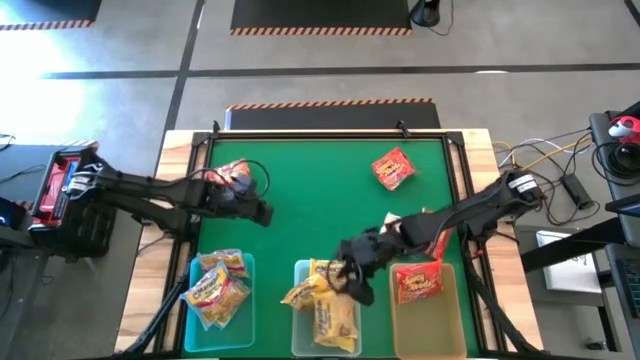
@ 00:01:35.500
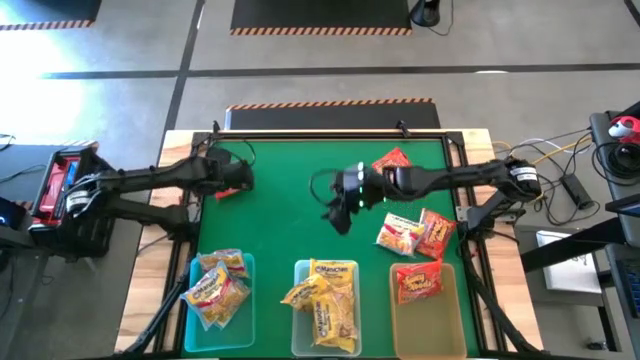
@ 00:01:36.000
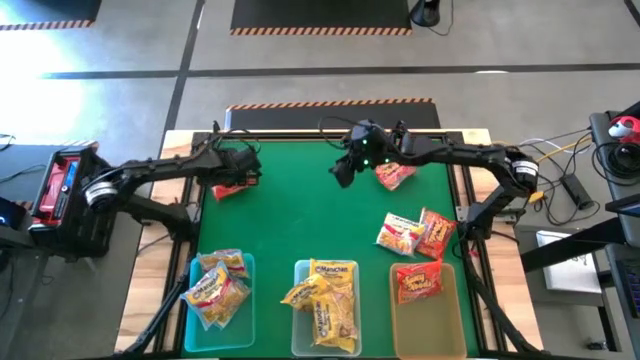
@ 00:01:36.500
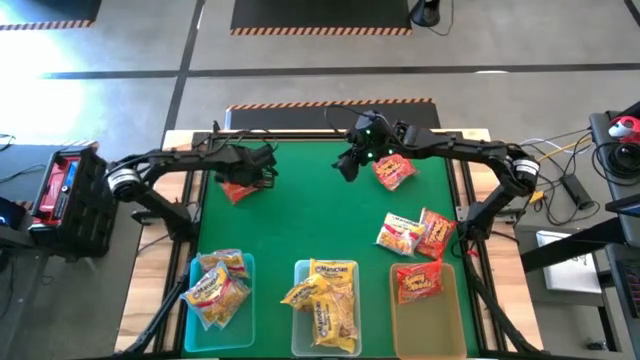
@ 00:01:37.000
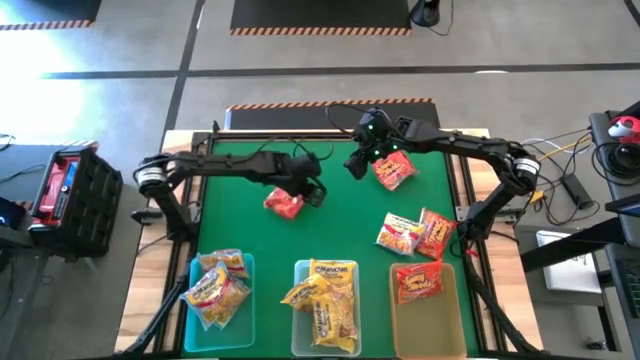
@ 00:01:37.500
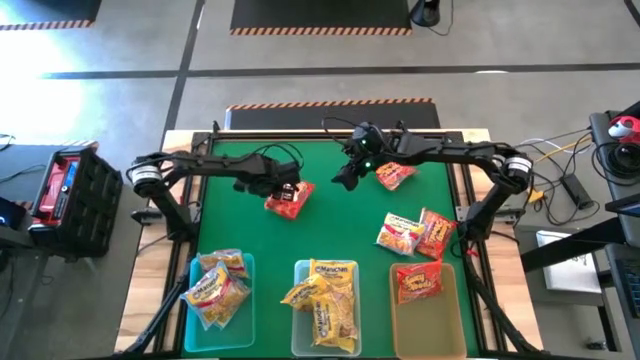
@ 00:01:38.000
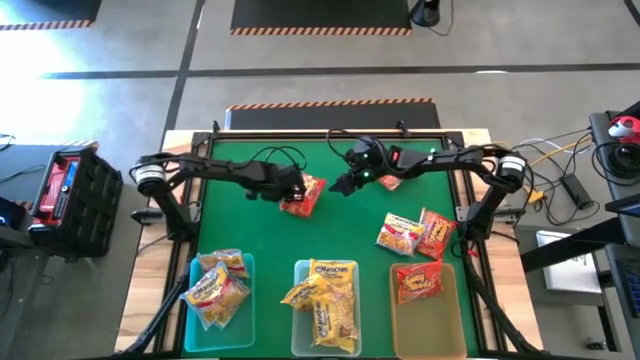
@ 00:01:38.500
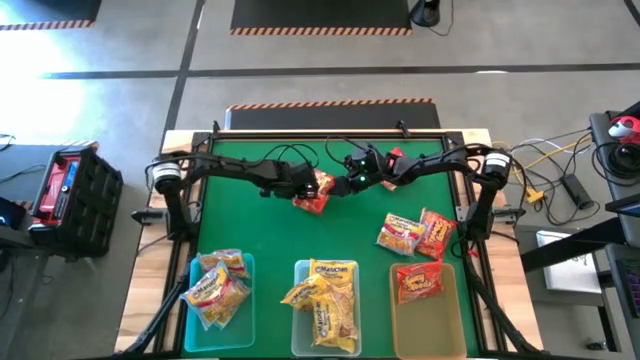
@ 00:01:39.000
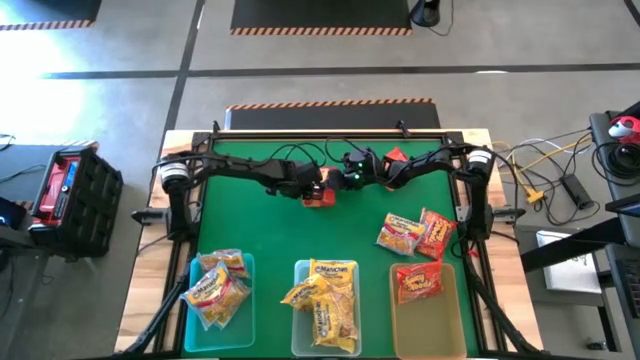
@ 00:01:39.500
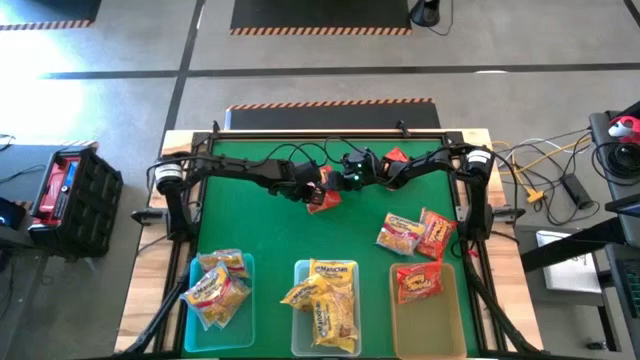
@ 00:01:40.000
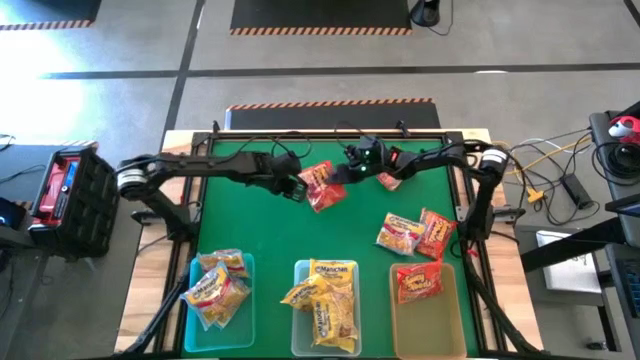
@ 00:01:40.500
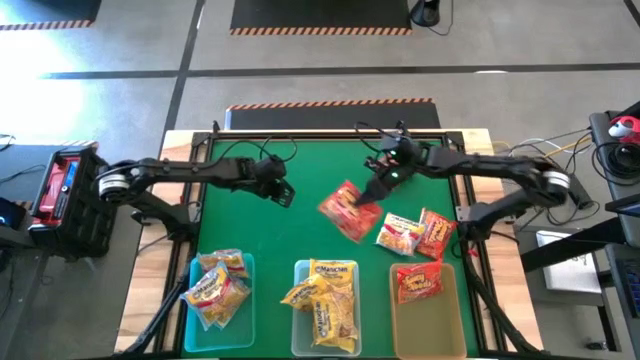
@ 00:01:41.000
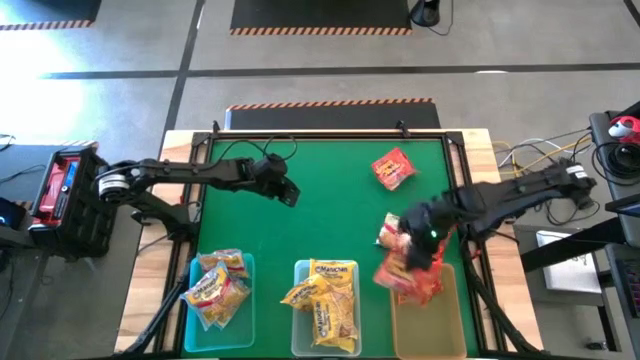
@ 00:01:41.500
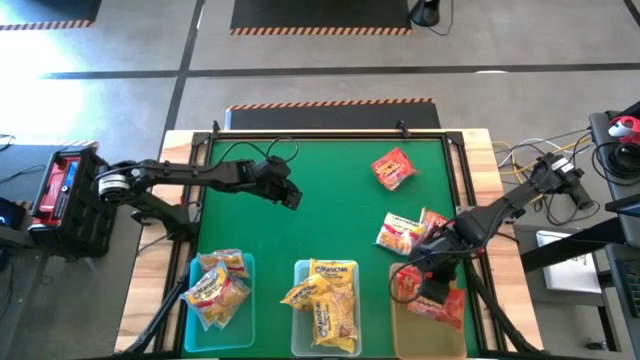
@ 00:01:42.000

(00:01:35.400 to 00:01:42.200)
Task: Sort Maruchan noodles
Put the orange noodle pack into the orange bin

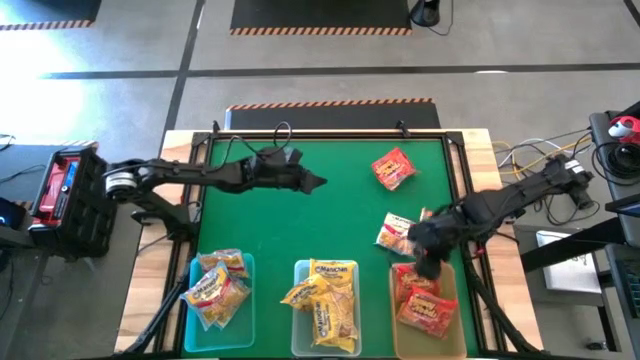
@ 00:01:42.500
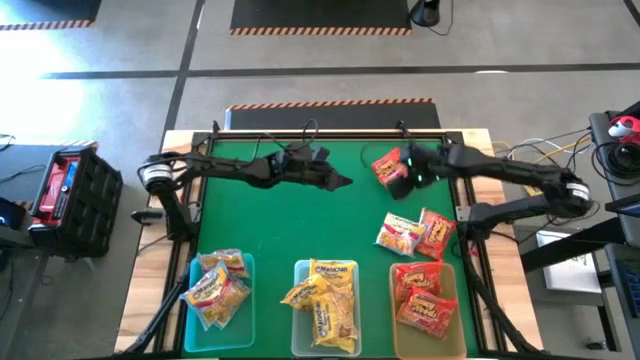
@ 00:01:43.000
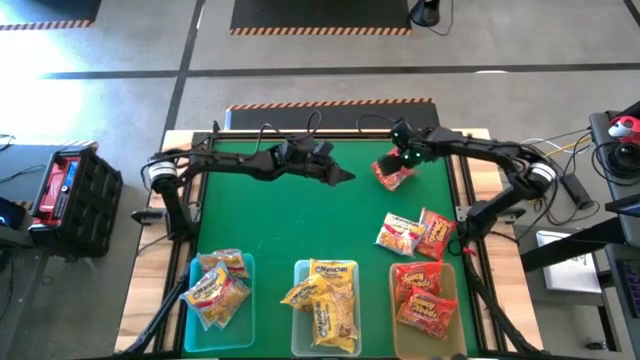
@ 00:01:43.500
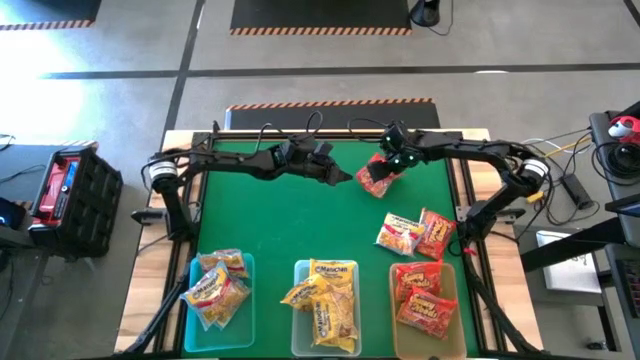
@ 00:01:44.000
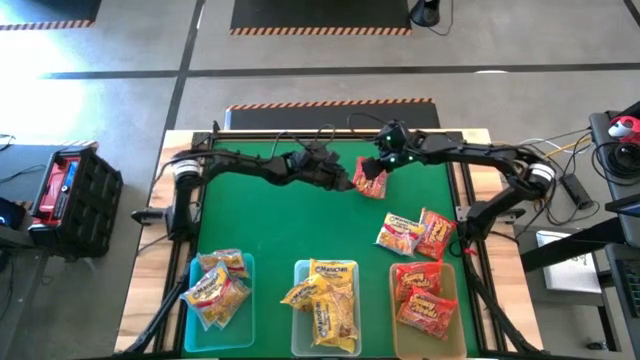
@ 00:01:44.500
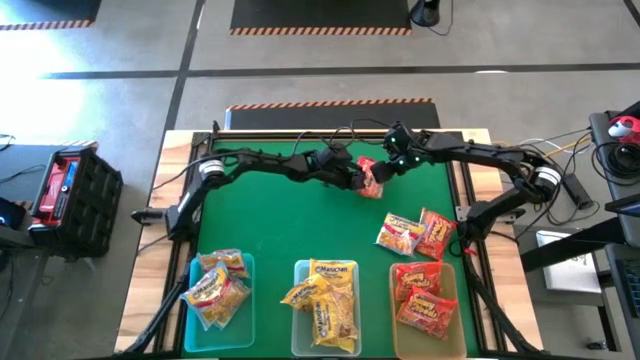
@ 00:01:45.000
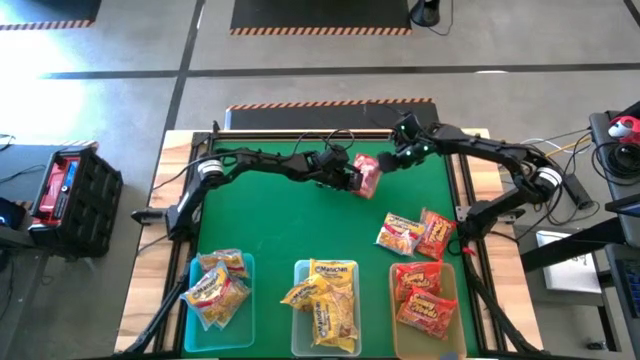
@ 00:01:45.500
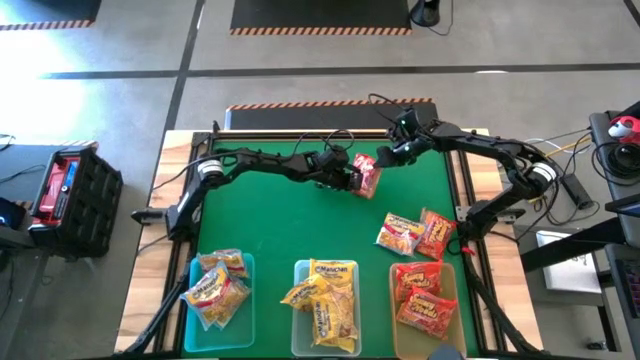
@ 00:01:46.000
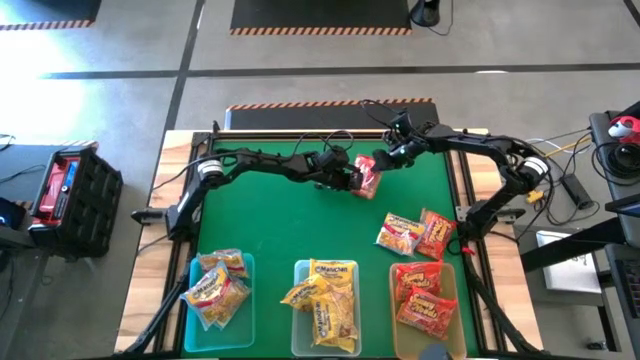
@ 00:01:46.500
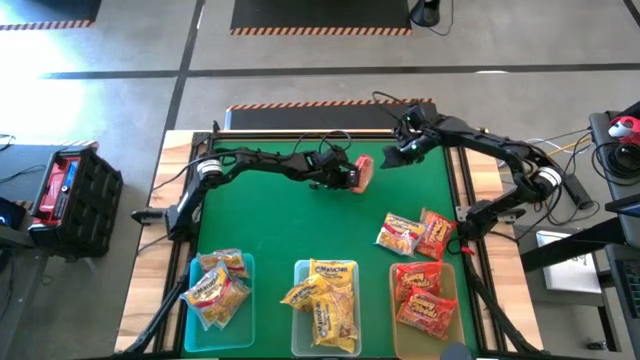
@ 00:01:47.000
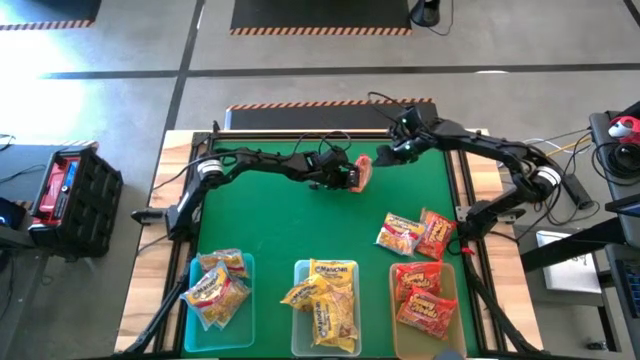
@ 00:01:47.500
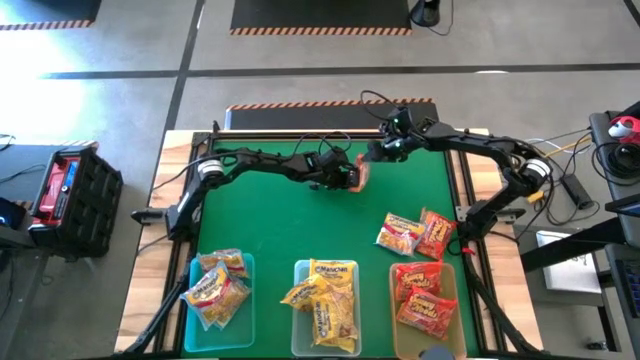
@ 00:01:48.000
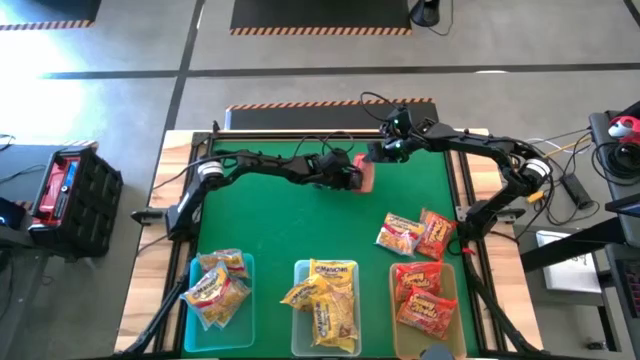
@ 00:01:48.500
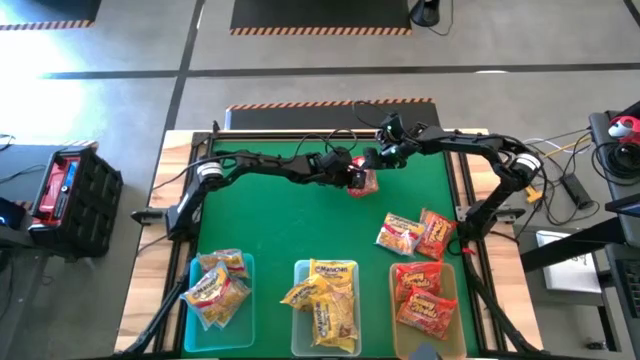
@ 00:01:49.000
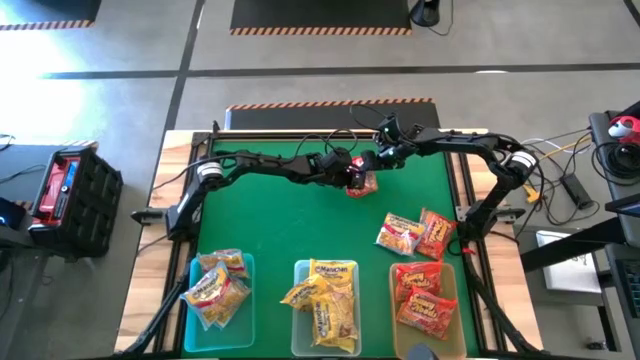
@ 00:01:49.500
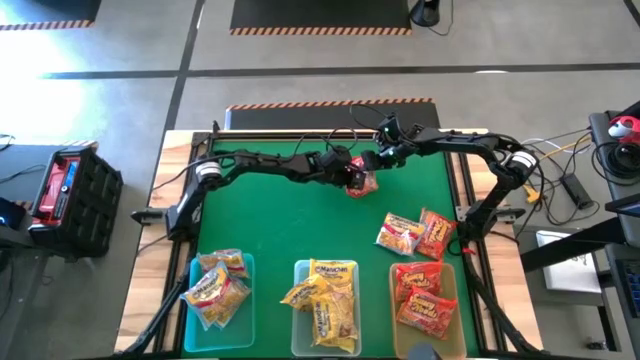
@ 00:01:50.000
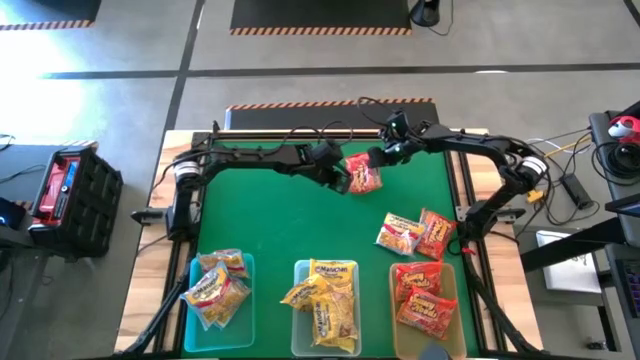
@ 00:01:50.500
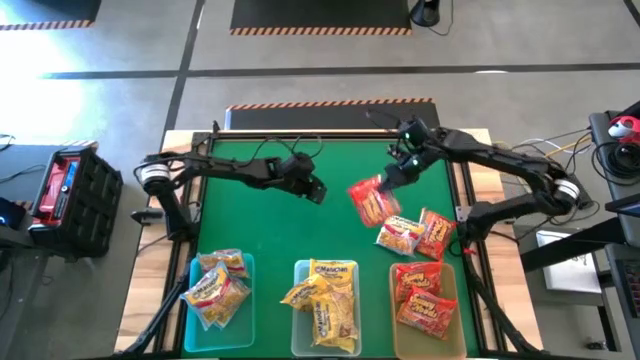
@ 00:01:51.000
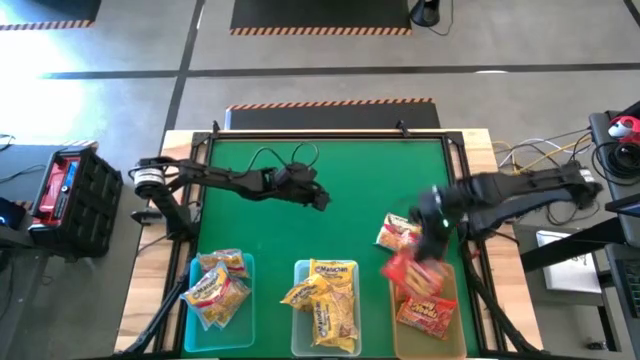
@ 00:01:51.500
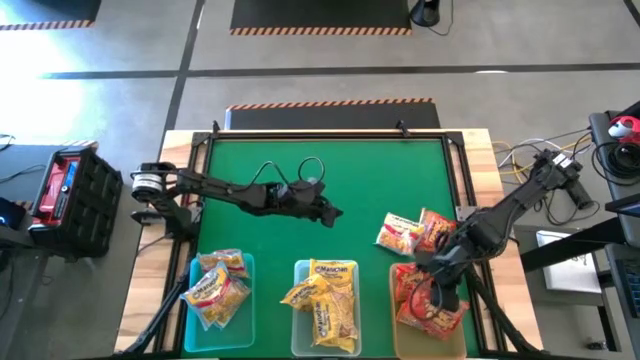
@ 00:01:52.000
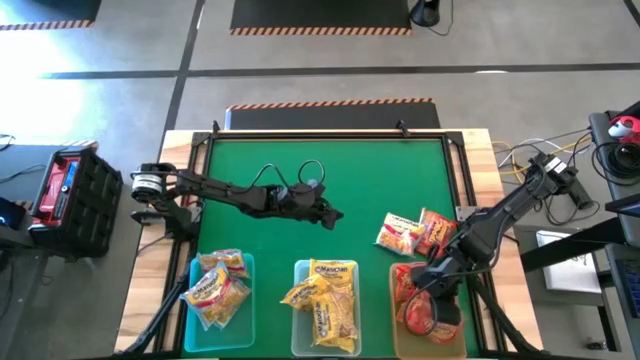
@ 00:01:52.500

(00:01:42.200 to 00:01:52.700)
Put the orange noodle pack into the orange bin
